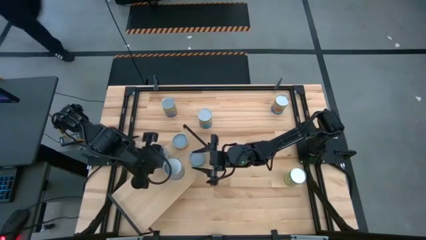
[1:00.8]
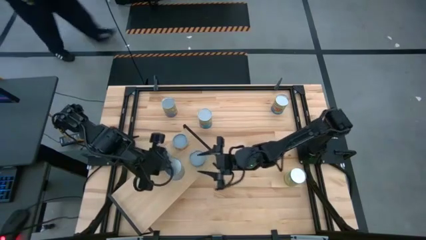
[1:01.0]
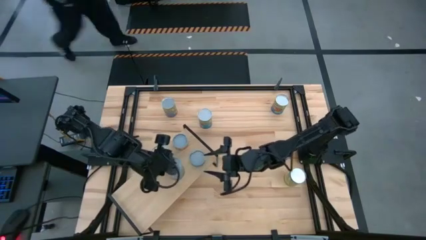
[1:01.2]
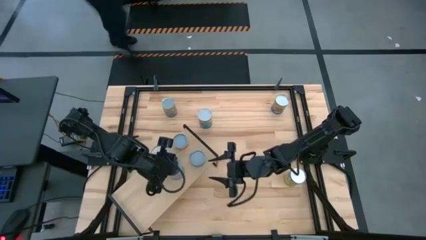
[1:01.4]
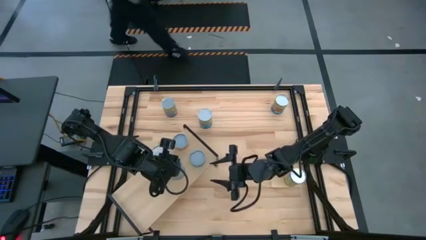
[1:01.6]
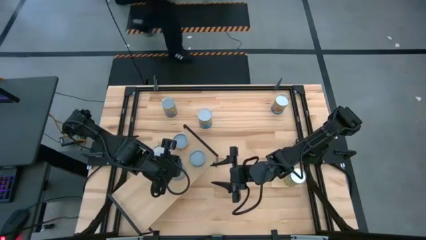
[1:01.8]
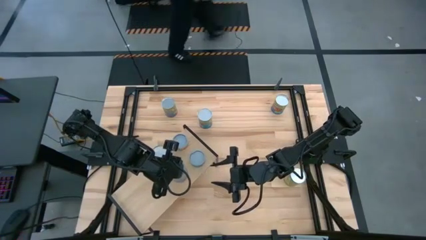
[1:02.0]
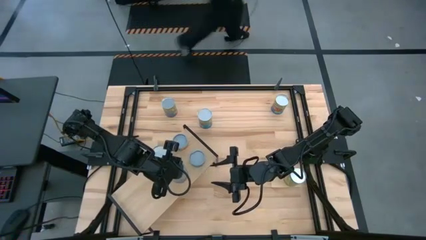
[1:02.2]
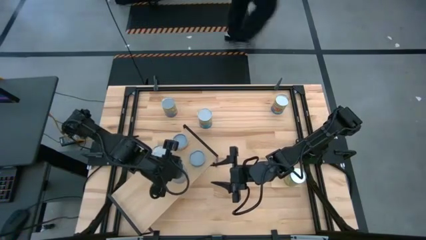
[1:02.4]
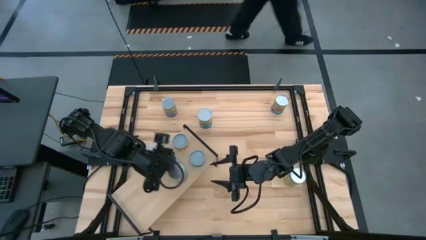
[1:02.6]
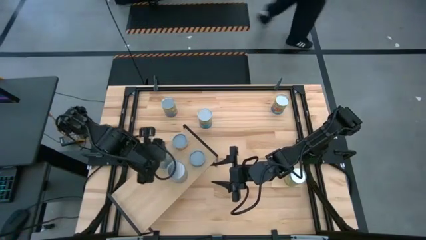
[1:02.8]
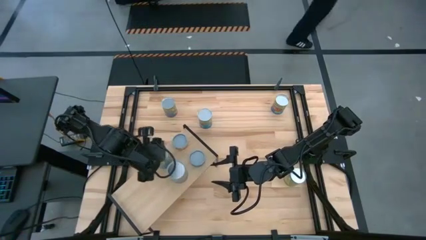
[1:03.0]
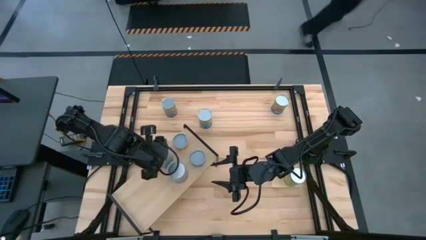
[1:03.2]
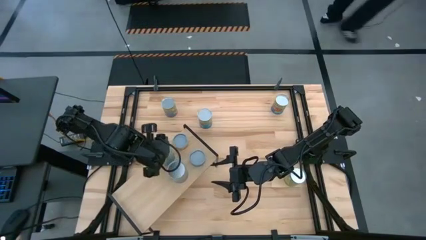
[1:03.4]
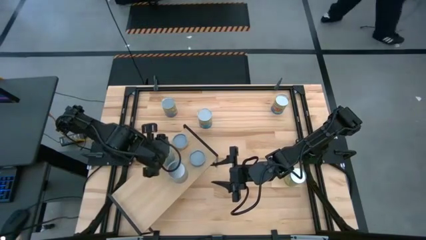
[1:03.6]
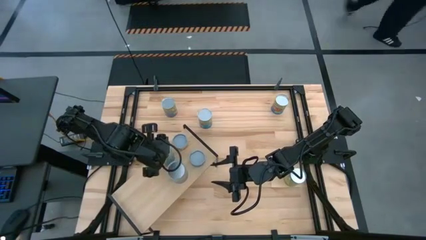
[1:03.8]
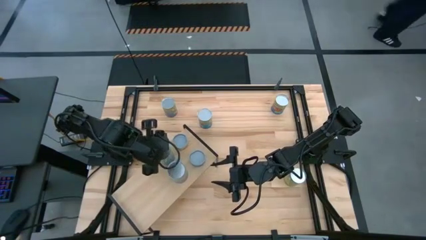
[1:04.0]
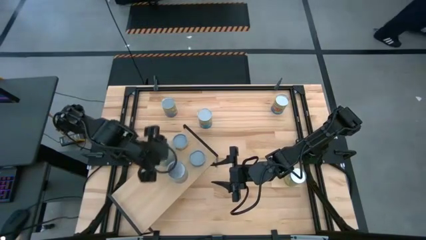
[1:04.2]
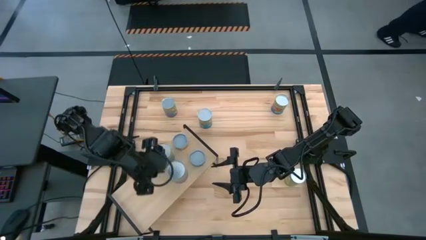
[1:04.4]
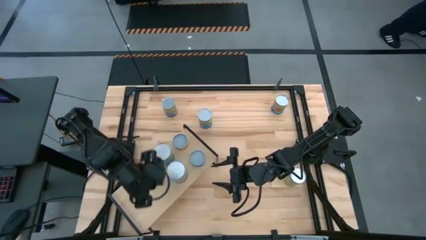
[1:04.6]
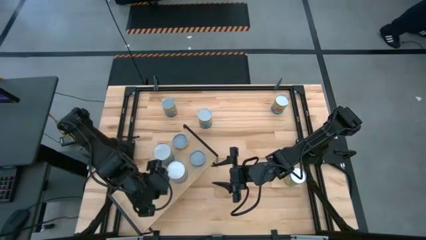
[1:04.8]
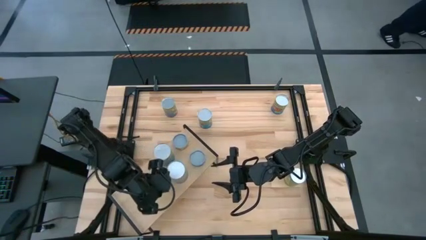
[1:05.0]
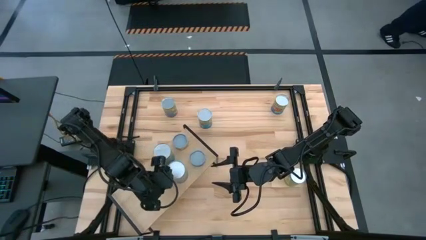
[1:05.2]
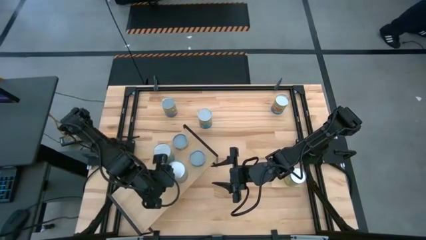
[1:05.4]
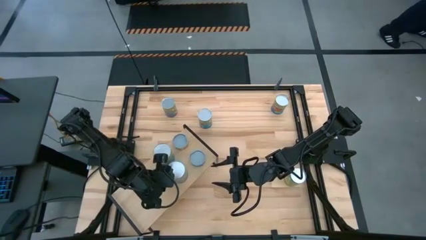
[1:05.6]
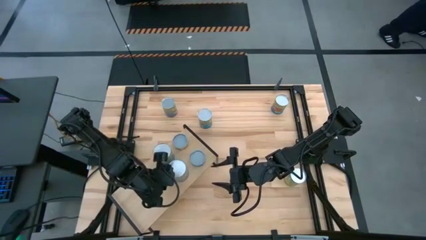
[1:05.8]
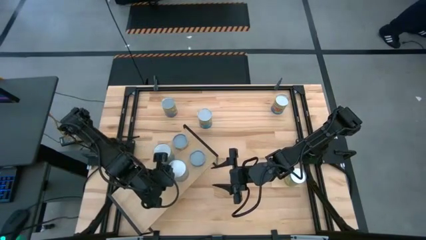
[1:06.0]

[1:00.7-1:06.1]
Task: Pick and place cans onto a shelf
Adjust the canned cherries on the shelf

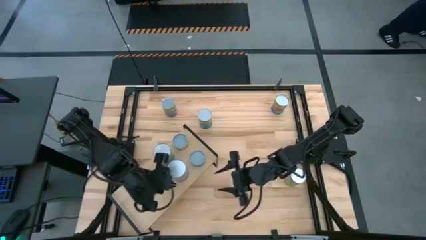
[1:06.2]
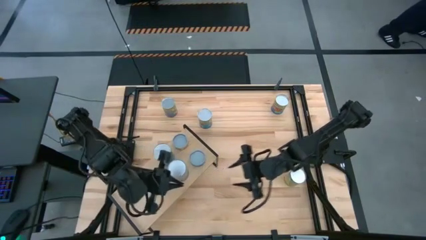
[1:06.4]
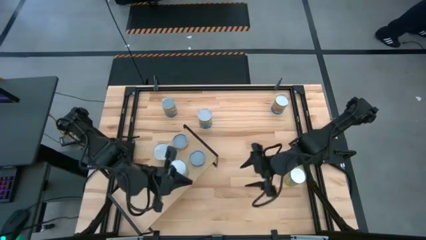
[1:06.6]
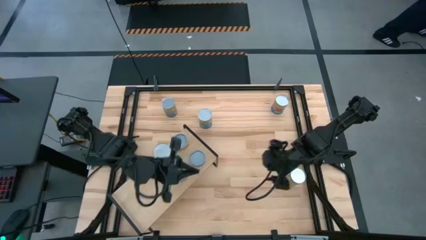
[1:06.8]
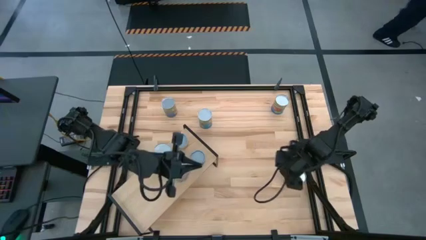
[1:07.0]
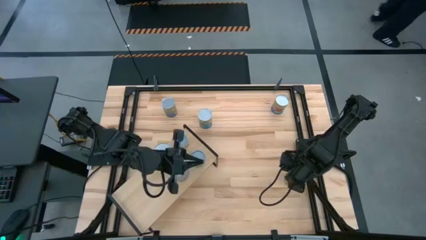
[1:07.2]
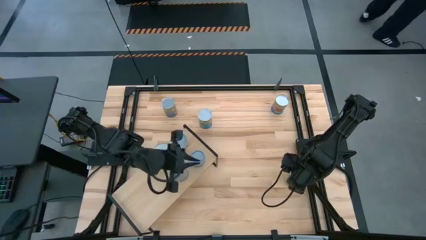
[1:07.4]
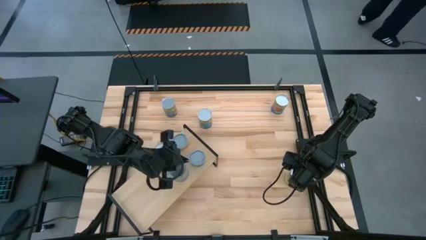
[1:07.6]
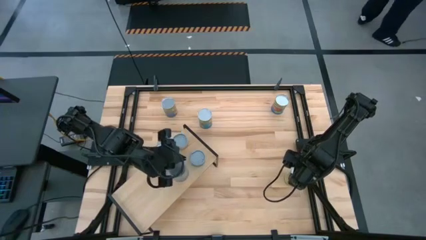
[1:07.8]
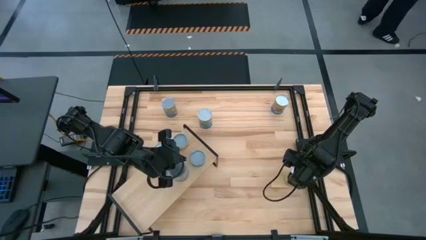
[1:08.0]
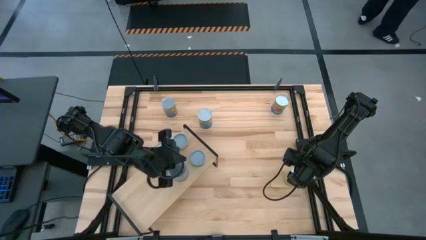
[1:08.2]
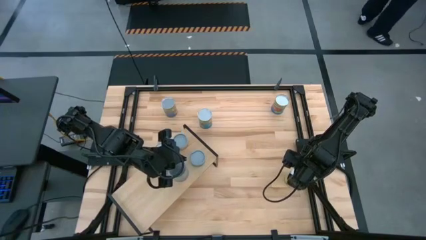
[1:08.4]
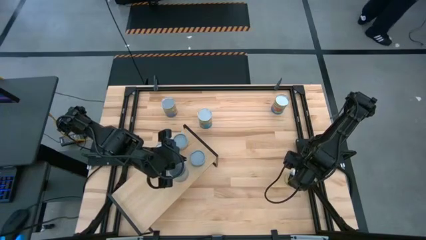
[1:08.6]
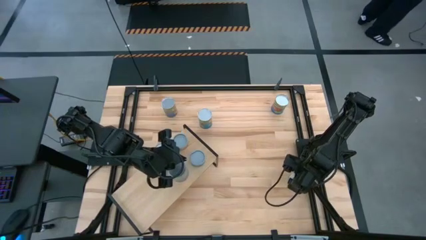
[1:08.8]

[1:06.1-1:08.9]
Put the canned carrots on the shelf

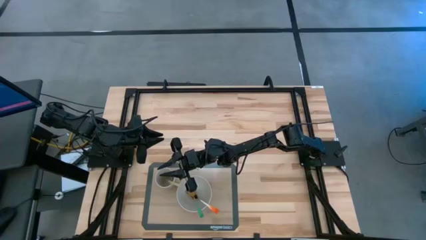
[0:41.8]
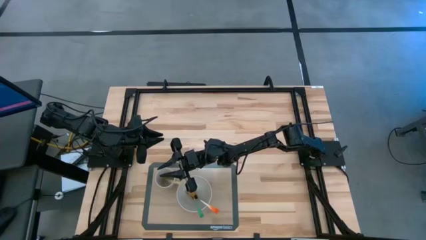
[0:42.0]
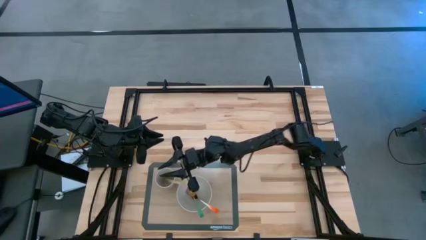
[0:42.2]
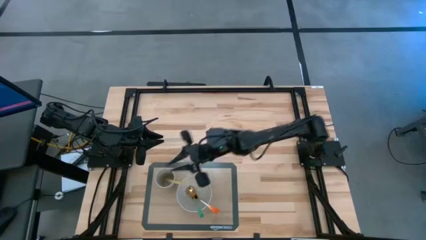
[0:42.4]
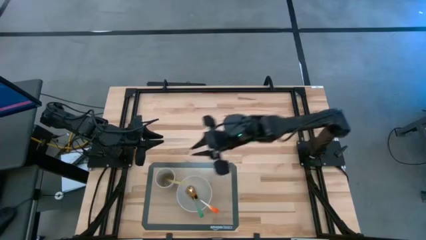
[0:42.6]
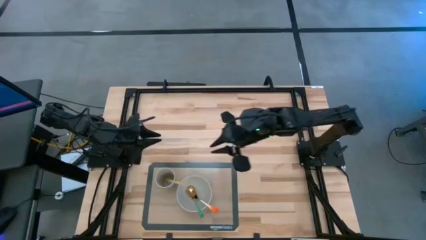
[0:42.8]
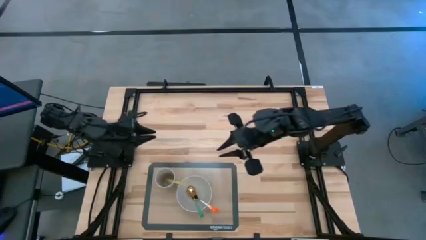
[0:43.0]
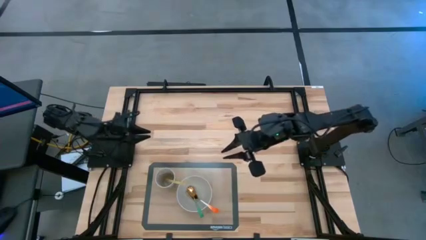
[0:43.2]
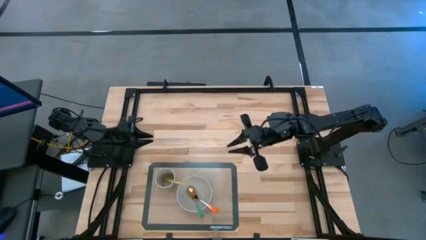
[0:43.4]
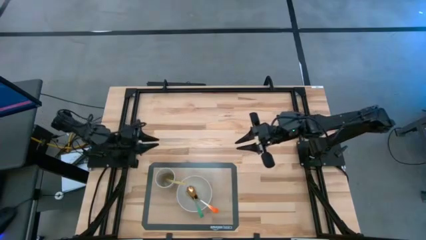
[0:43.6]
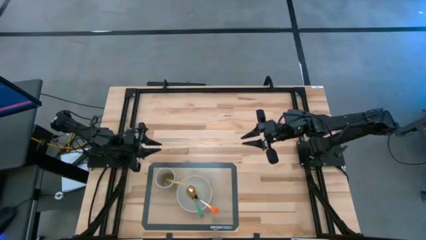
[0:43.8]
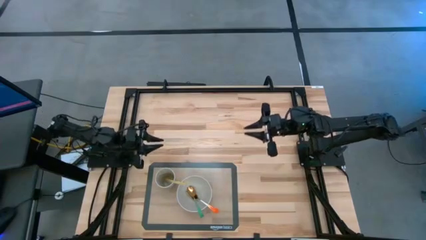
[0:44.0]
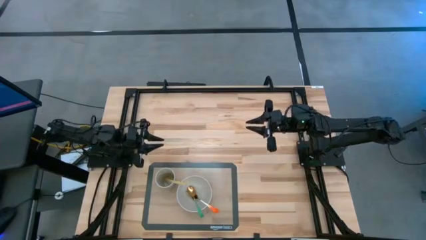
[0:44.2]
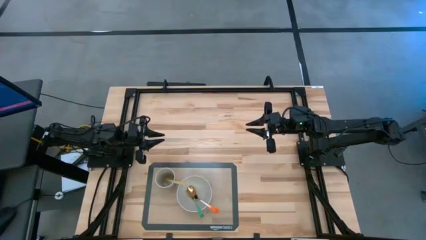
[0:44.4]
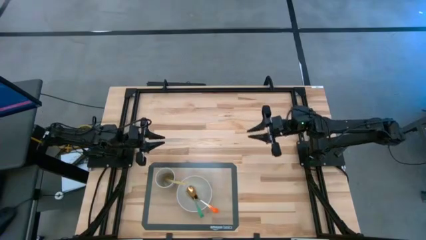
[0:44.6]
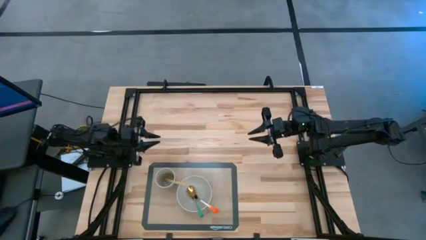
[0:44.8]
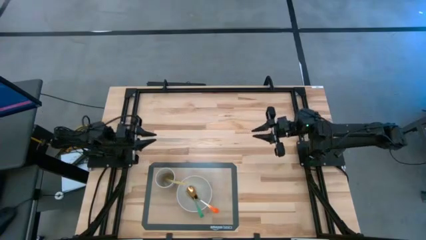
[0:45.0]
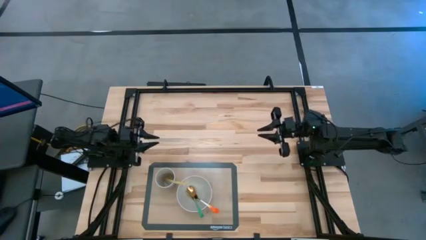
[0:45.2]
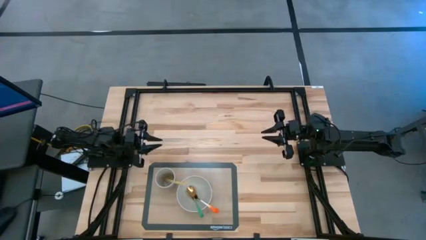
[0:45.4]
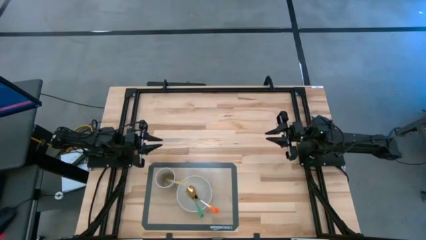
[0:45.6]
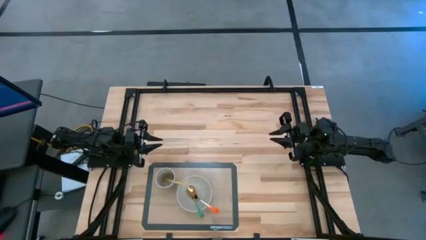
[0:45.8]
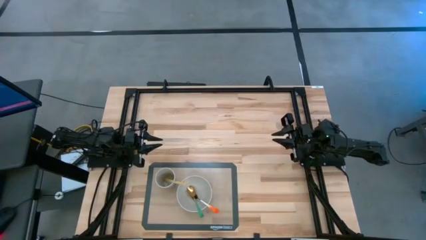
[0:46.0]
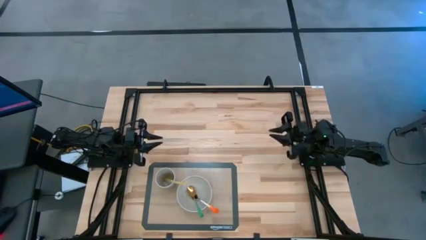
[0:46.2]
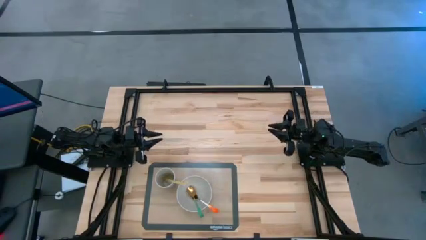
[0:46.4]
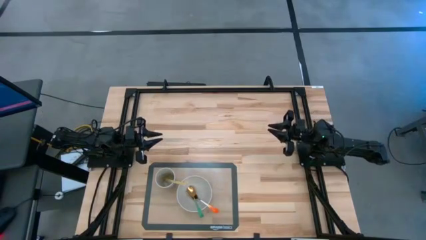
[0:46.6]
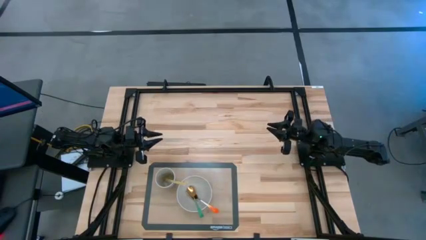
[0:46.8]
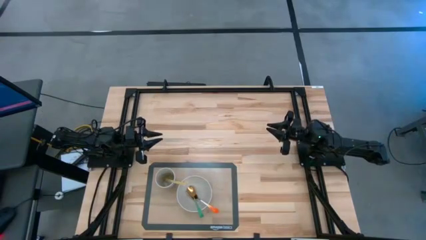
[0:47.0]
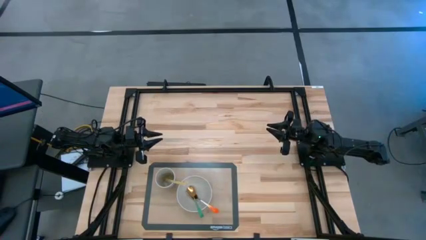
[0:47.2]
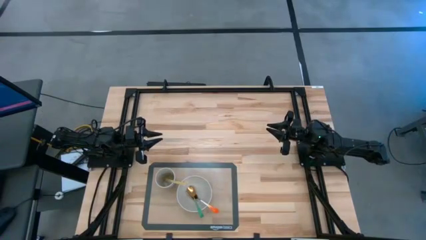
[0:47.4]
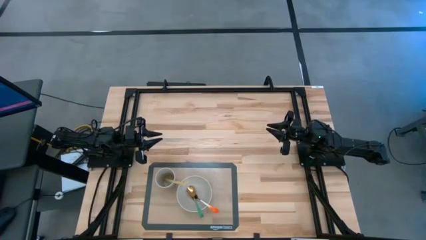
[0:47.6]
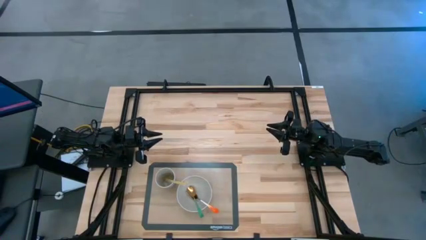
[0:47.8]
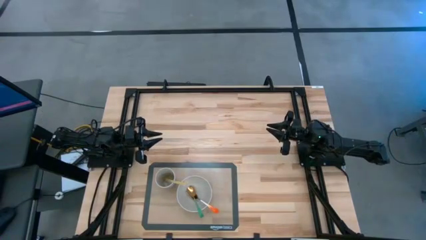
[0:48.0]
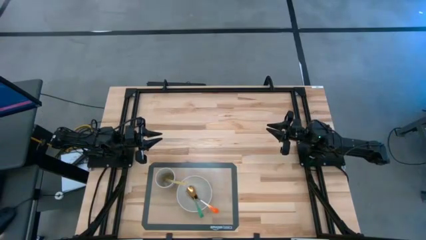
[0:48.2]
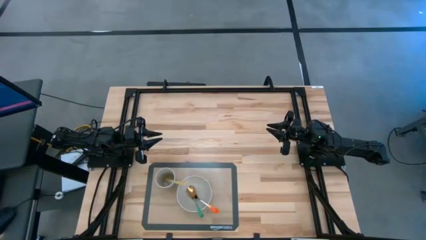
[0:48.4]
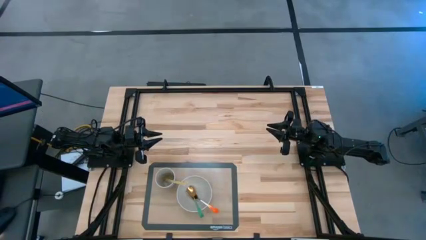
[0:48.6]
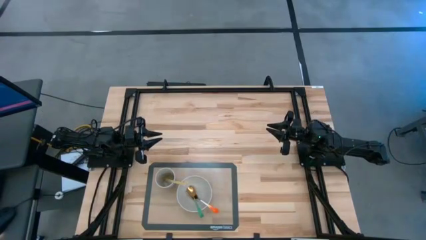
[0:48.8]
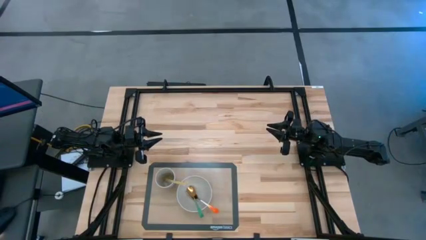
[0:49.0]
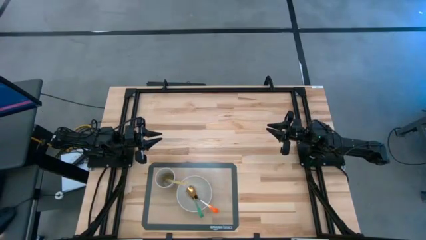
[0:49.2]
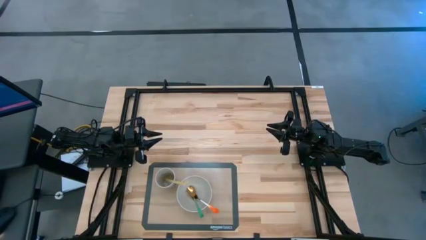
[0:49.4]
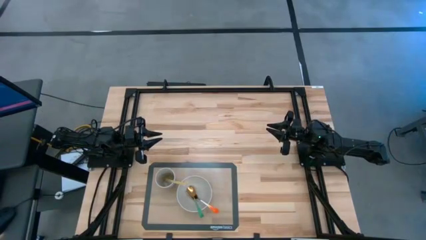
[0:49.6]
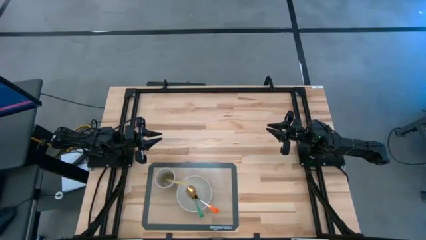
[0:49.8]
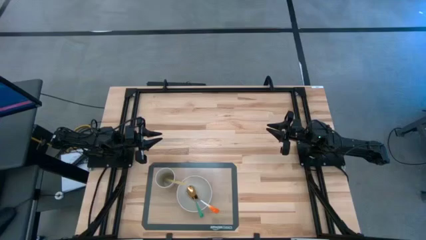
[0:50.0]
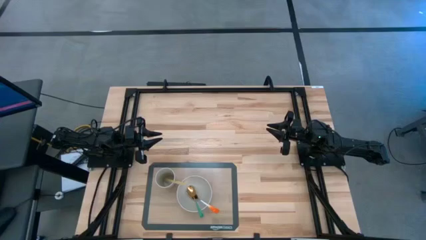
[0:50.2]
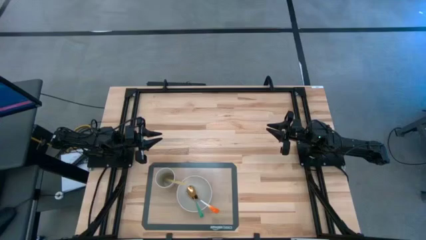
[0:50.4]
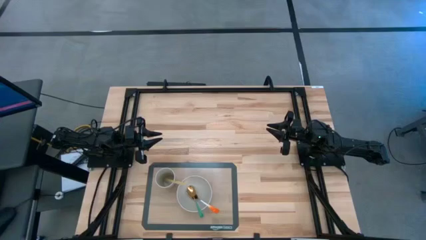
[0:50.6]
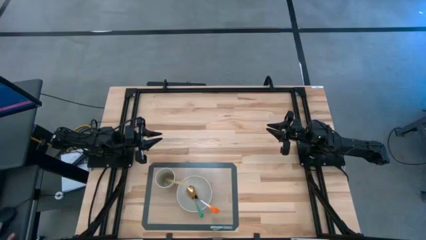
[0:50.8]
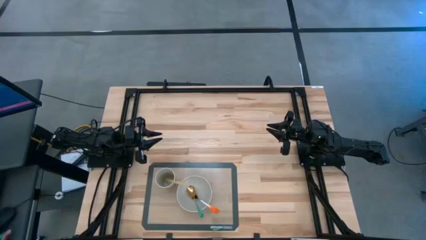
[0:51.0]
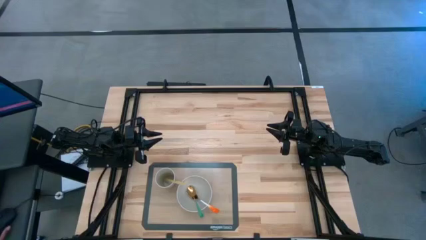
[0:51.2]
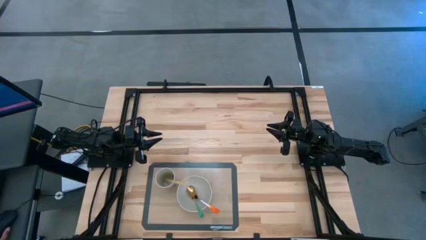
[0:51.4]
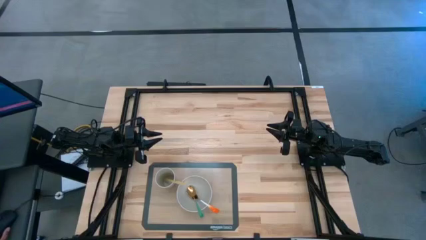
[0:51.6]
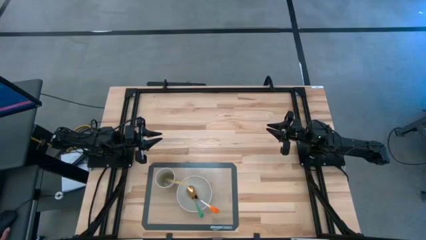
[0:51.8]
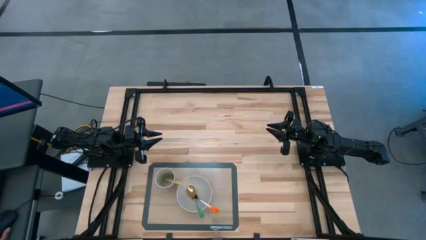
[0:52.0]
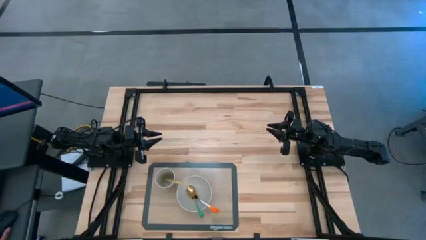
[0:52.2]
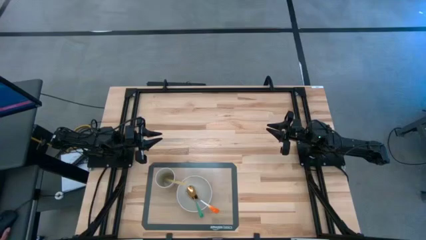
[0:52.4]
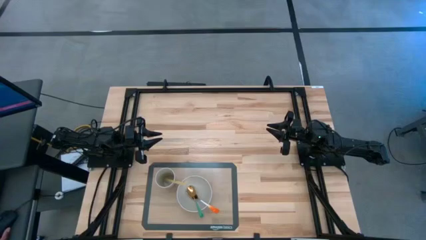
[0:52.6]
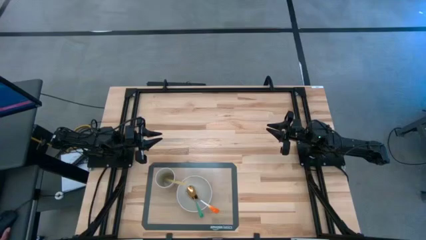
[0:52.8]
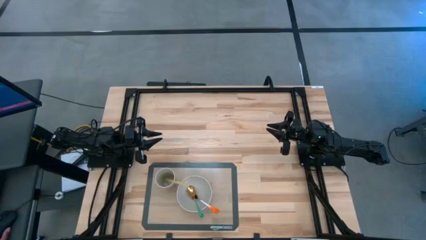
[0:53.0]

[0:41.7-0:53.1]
Task: Pick & Place Utensil
Return to Home Position
